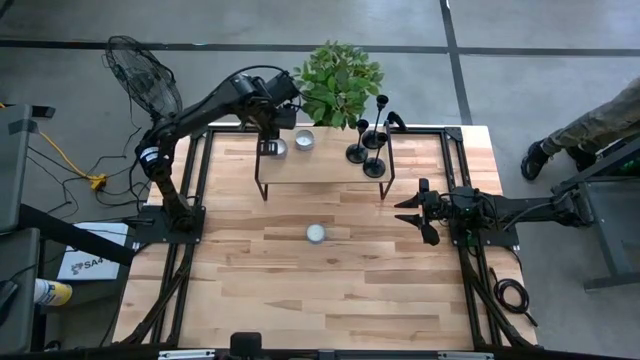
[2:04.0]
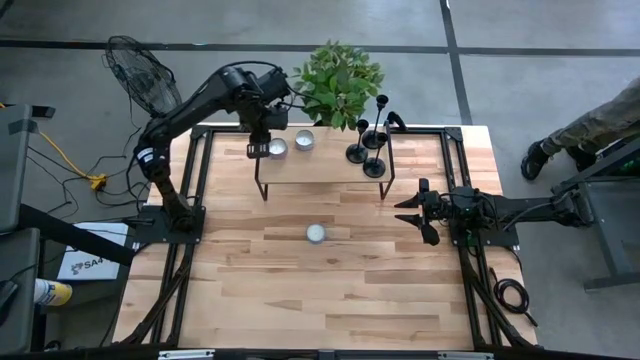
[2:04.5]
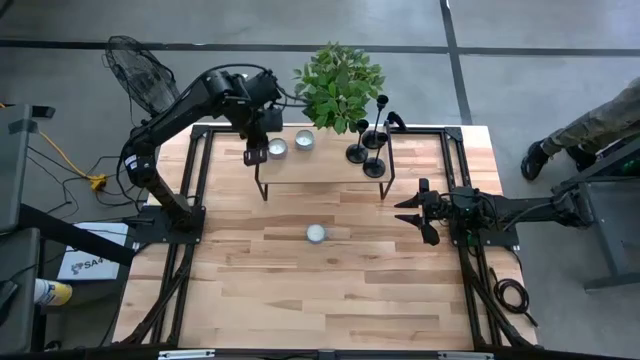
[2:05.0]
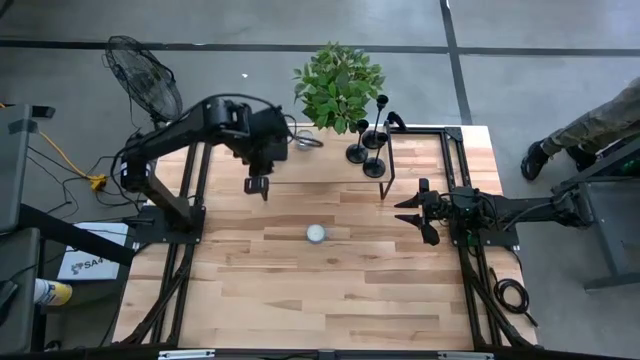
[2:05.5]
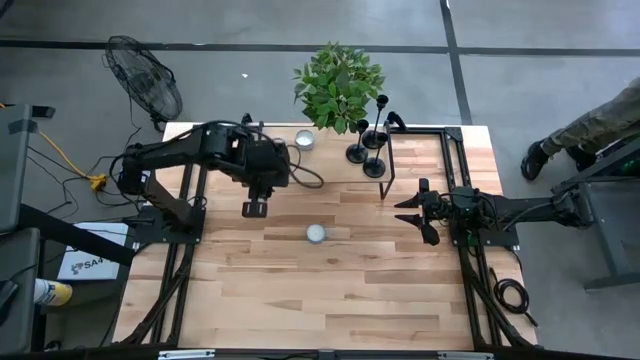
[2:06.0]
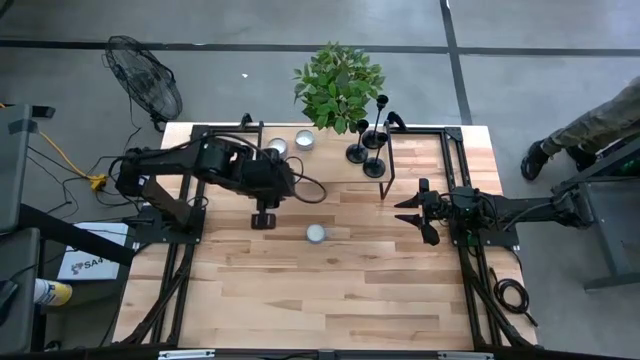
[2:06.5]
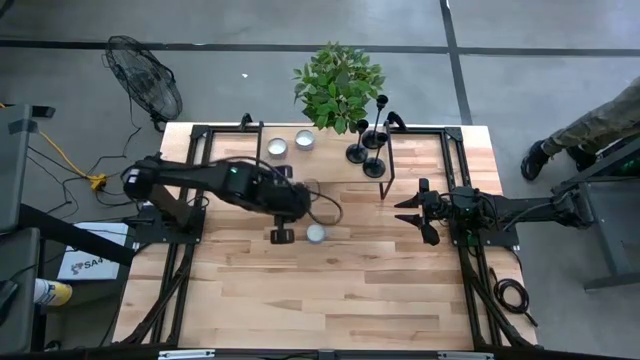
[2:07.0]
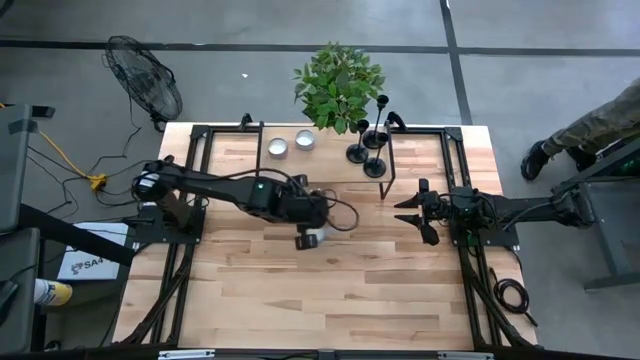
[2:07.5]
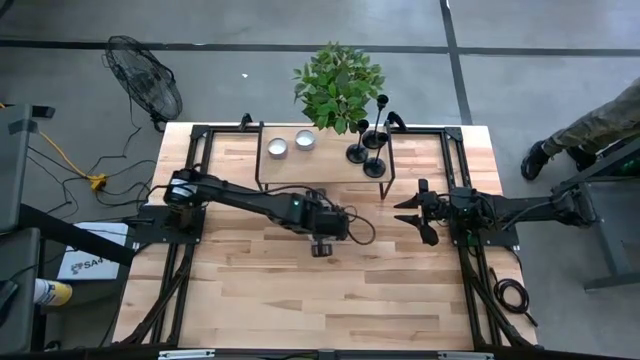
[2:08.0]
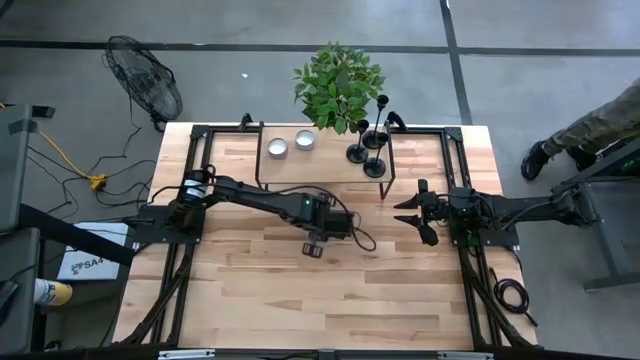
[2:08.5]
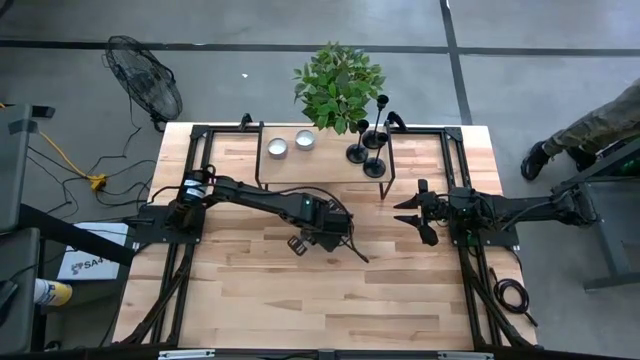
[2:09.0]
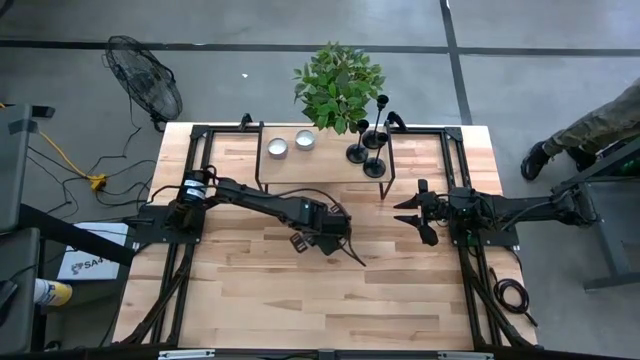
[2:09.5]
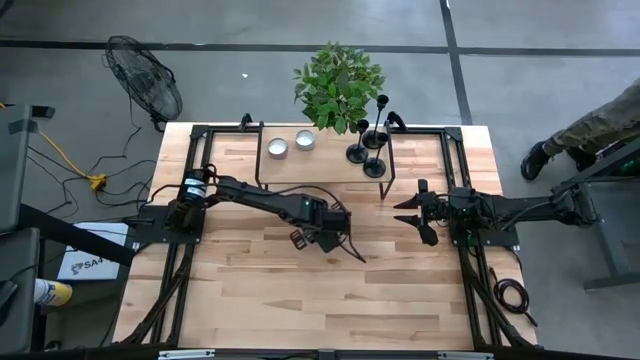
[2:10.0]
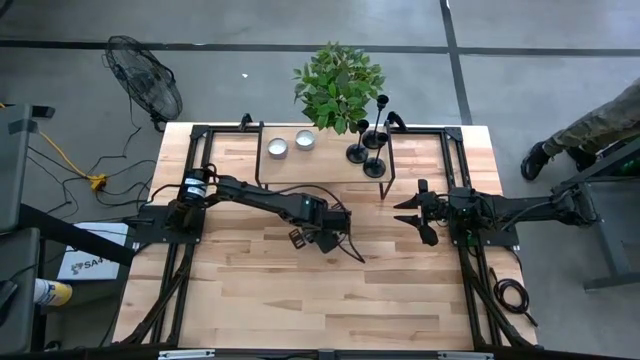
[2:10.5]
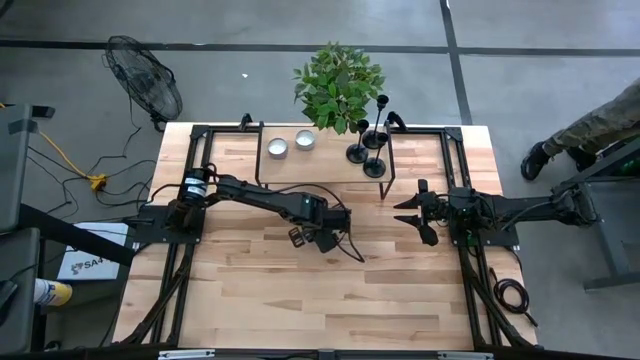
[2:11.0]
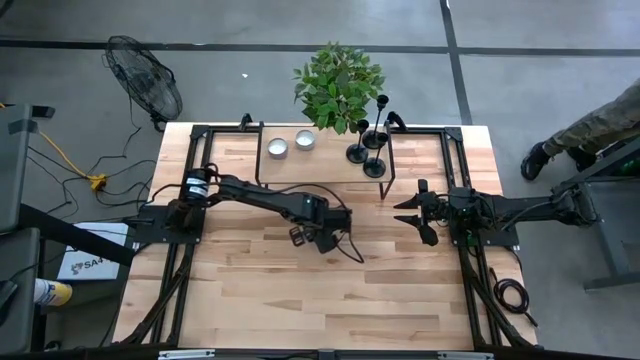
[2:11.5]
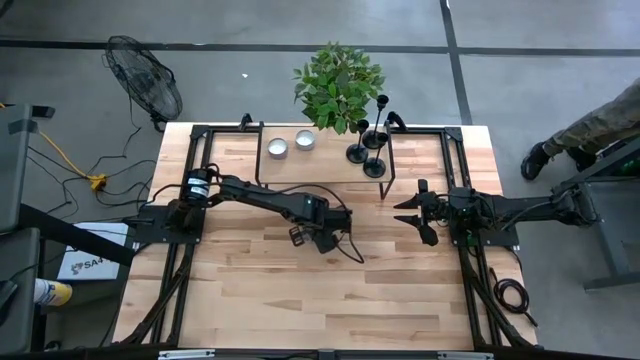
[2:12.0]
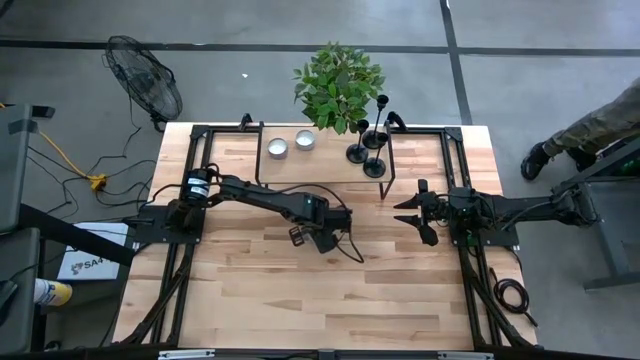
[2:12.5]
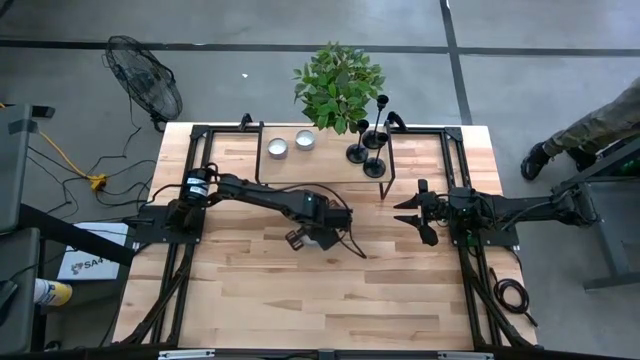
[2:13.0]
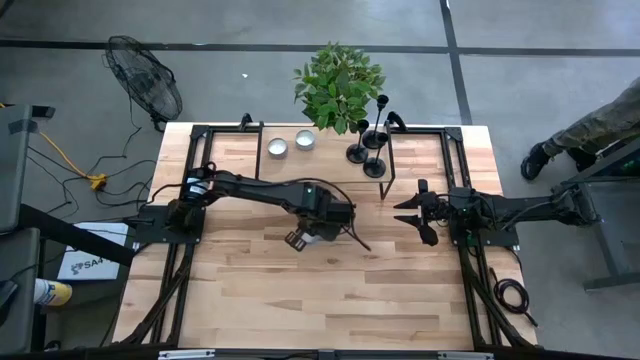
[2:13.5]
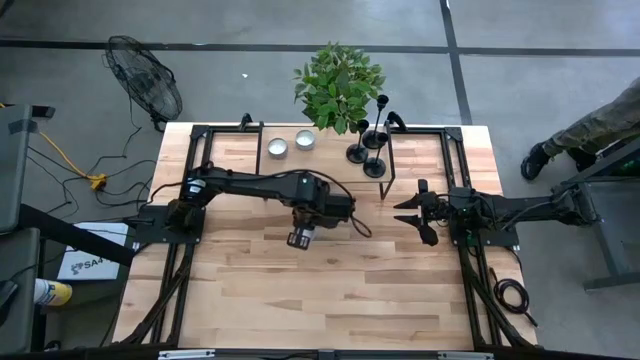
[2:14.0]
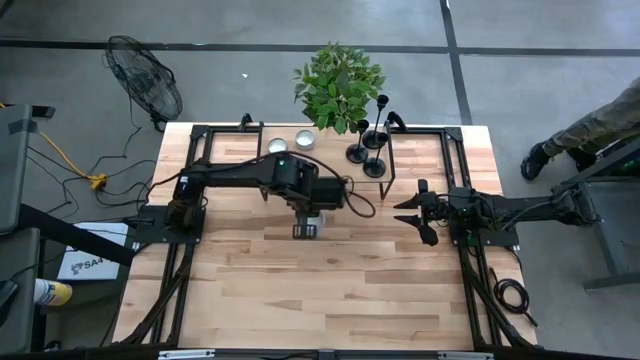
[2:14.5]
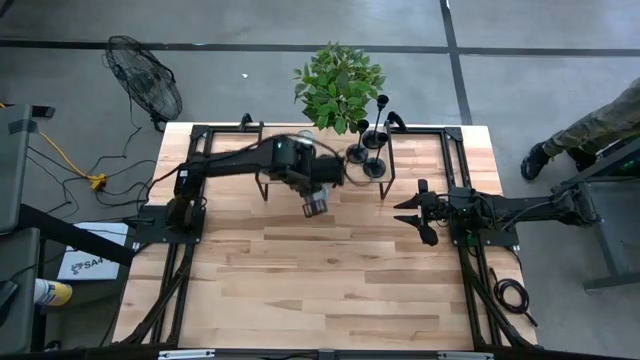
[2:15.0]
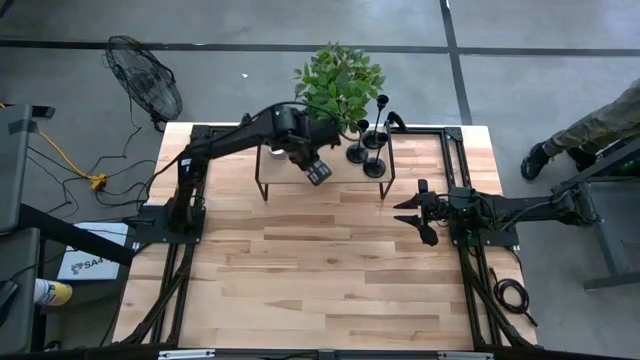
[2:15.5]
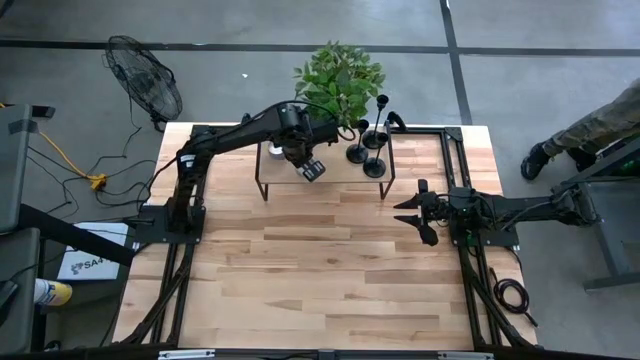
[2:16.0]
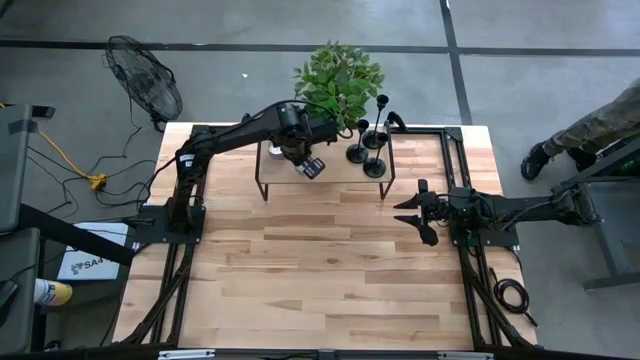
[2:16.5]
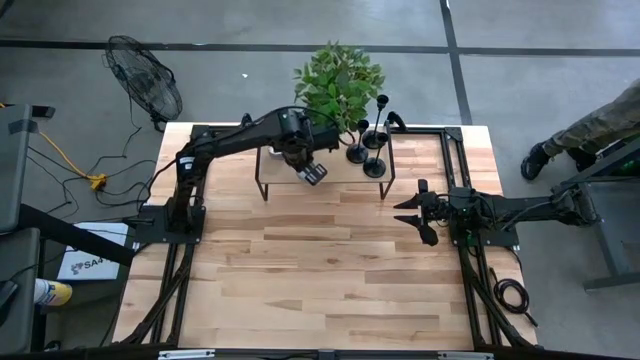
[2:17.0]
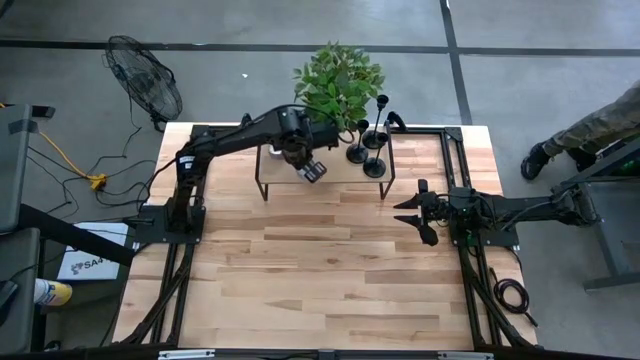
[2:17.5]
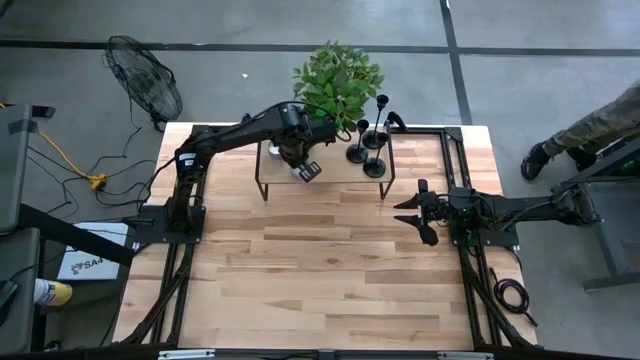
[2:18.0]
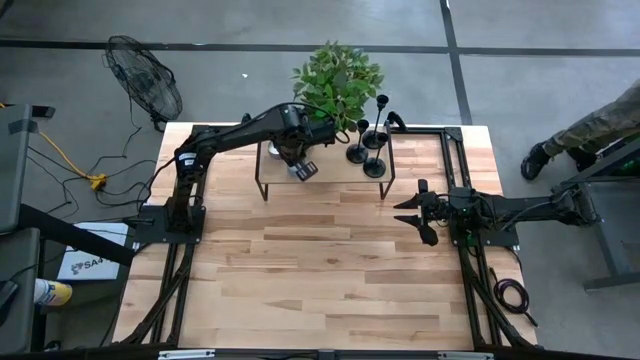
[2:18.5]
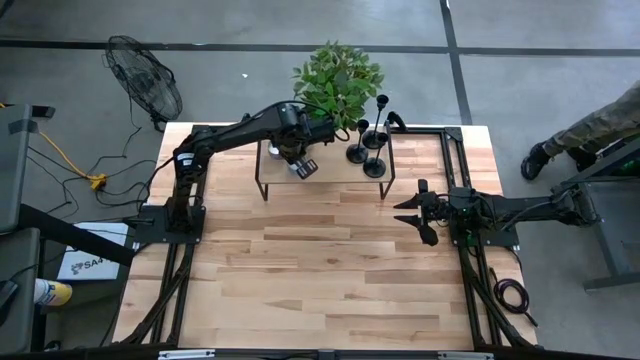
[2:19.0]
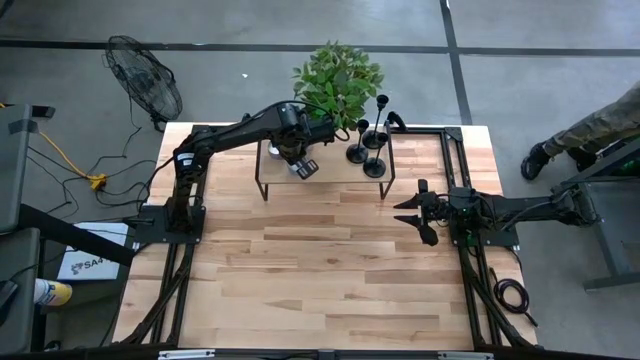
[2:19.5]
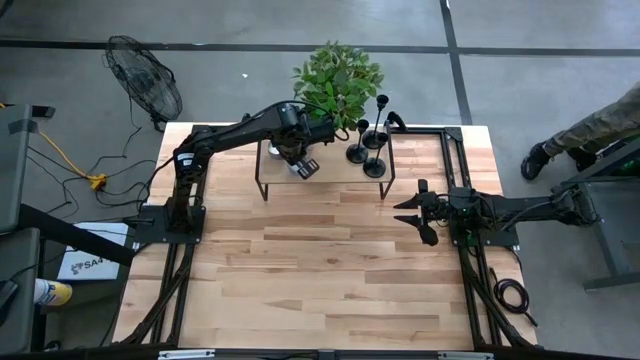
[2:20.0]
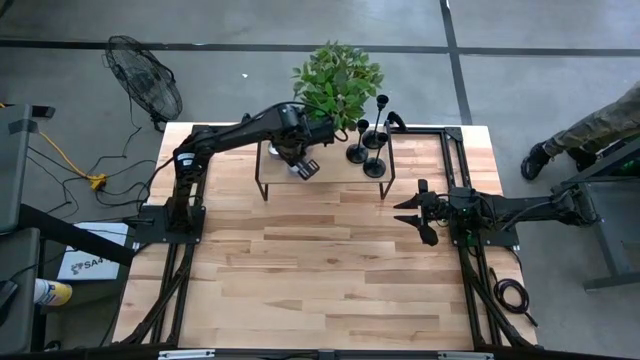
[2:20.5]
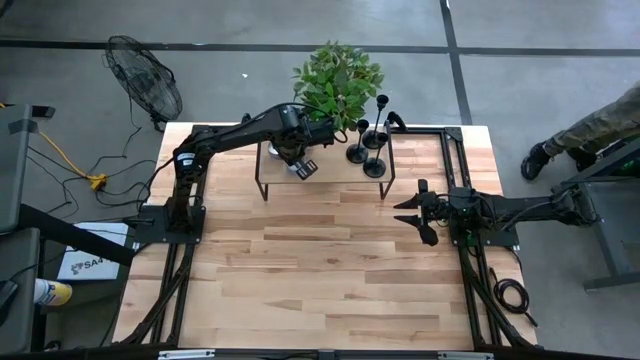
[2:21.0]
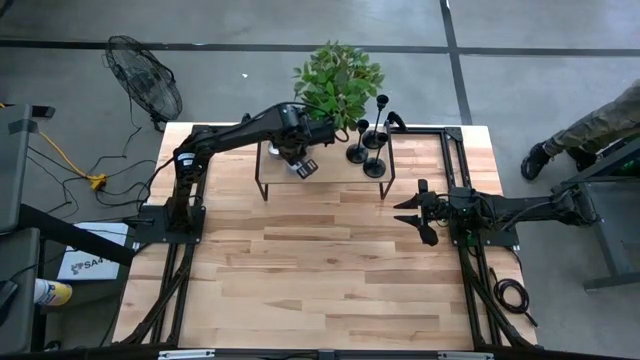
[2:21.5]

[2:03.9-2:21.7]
Task: Pick & Place candle stick holders
Put the blue scented candle on the shelf

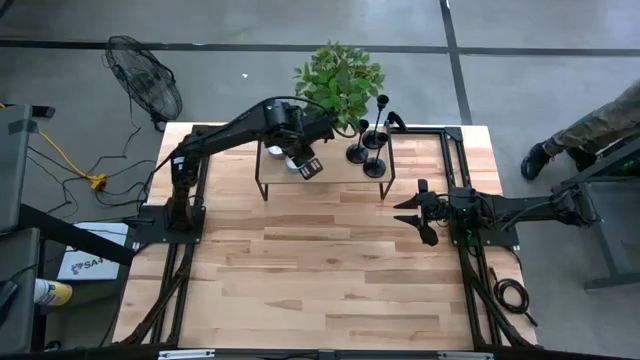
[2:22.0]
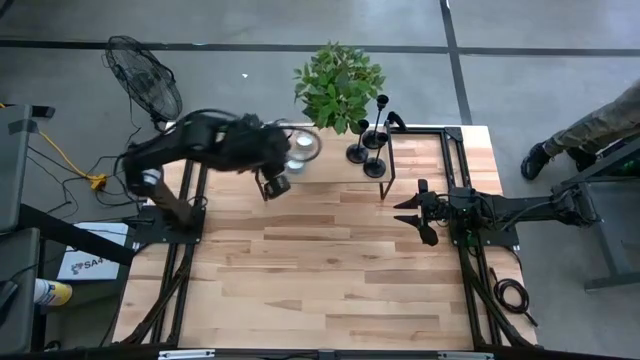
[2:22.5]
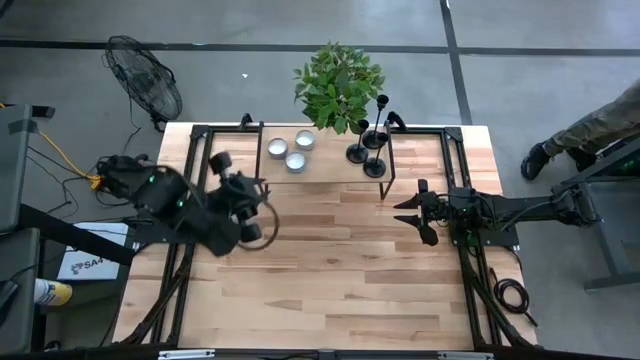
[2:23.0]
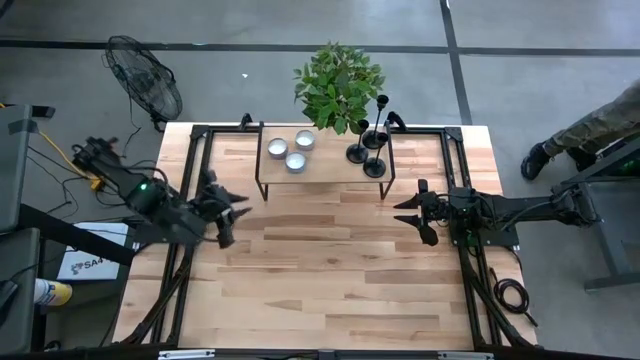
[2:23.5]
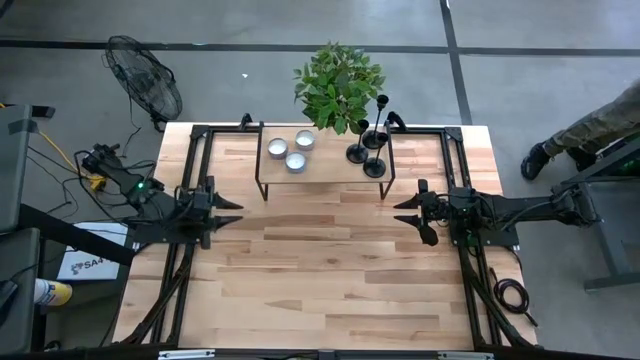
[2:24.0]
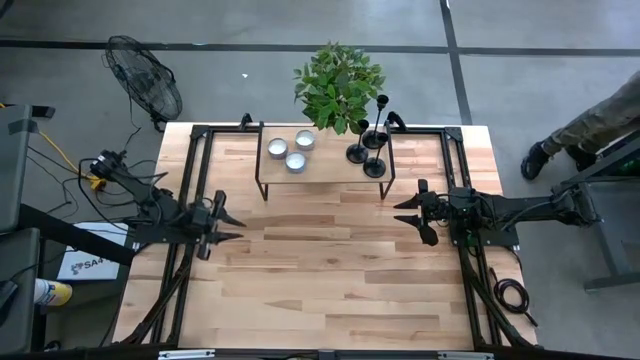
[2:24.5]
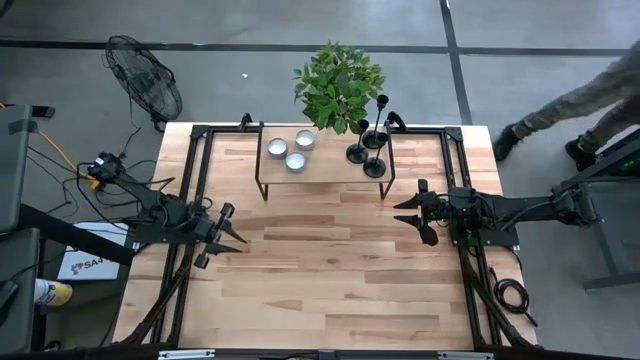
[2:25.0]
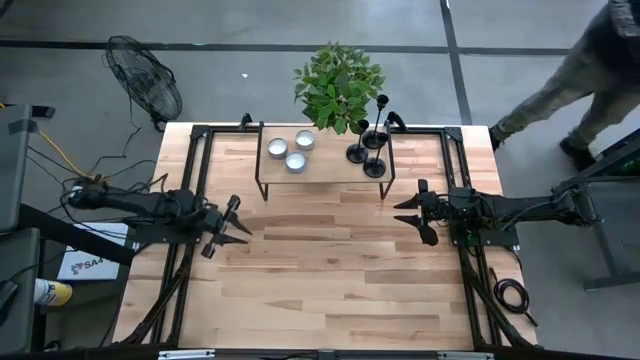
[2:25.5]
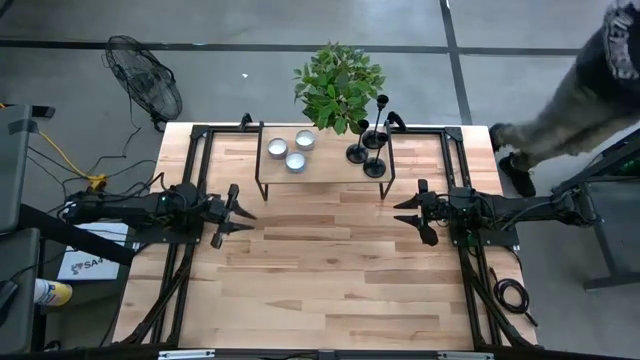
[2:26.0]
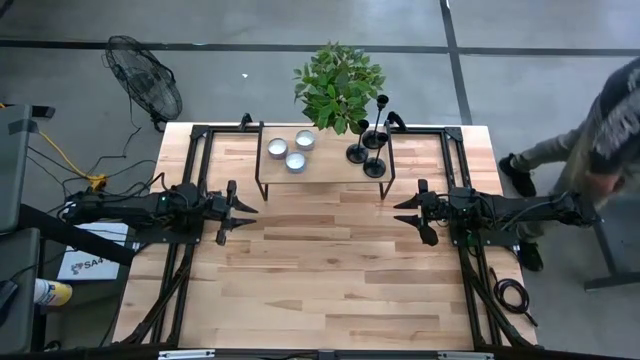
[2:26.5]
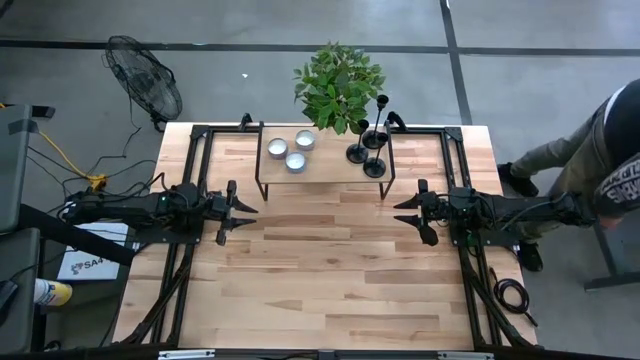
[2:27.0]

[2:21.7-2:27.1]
Return to Home Position
